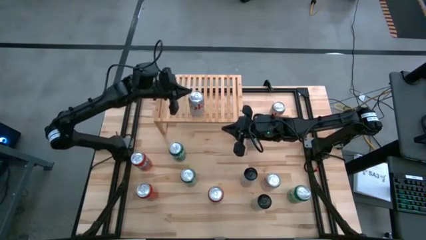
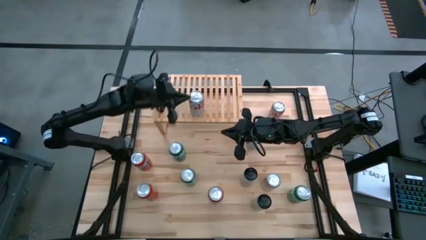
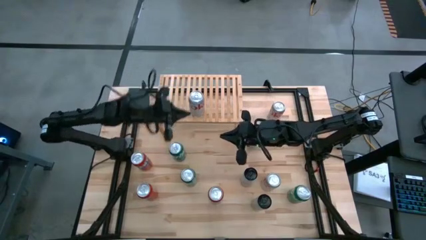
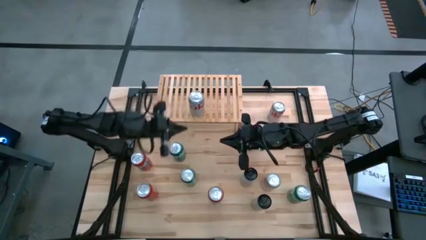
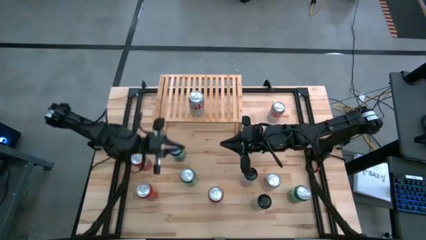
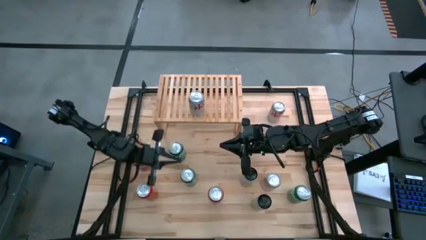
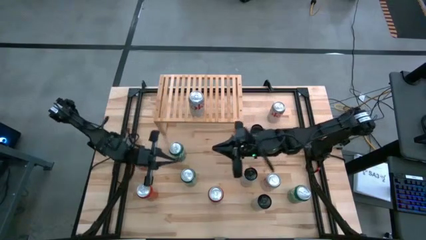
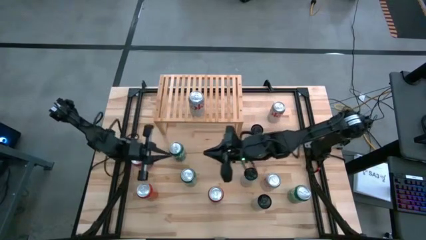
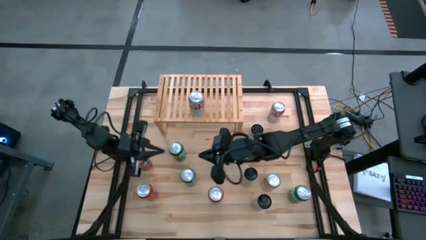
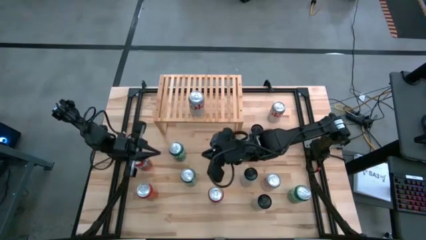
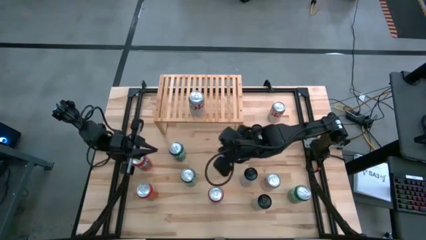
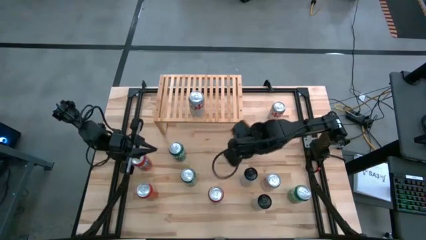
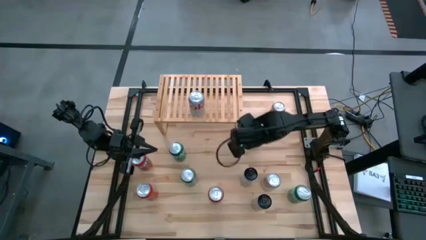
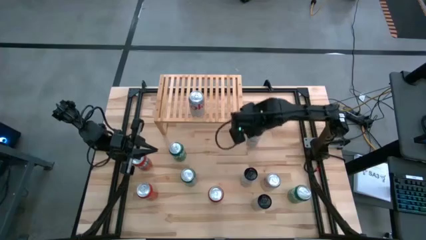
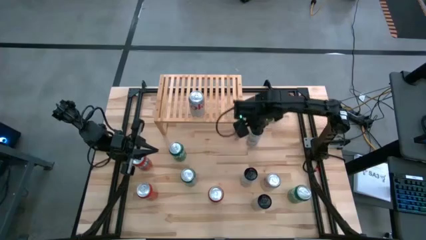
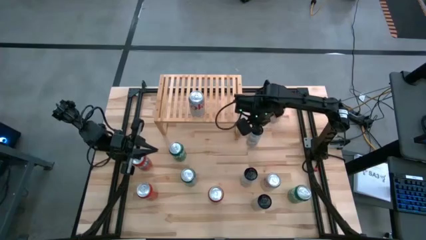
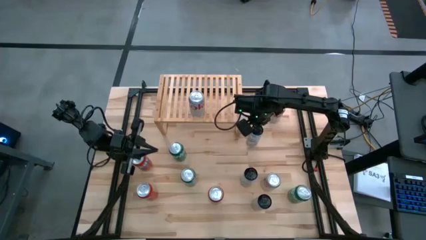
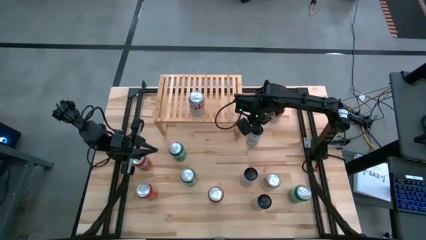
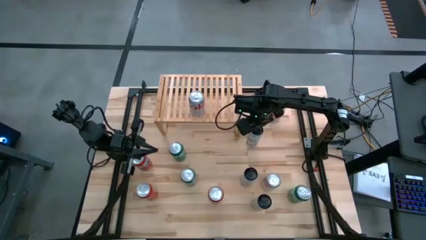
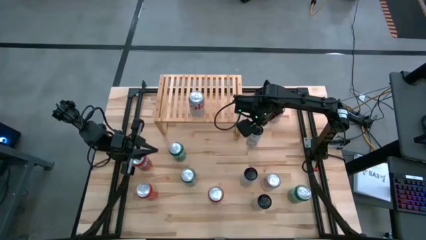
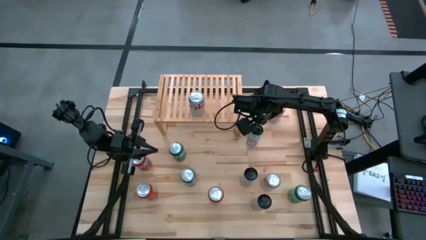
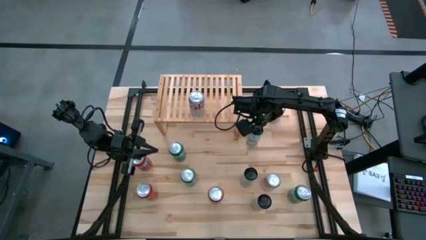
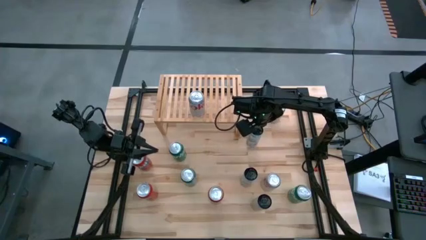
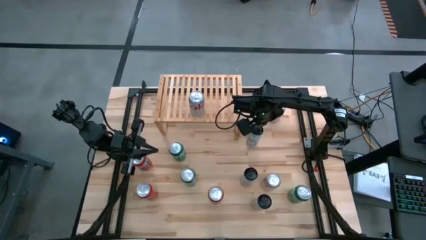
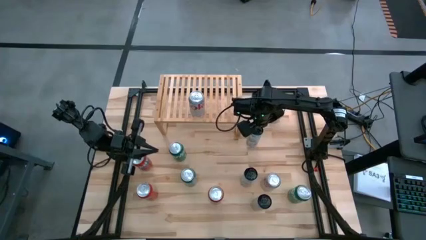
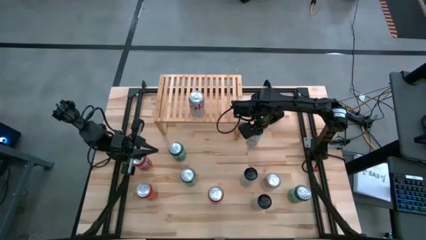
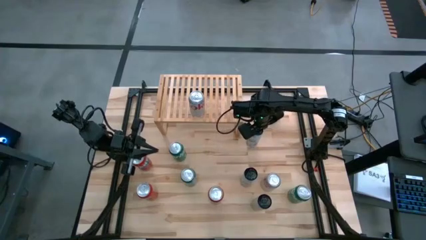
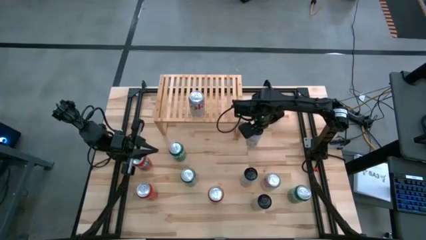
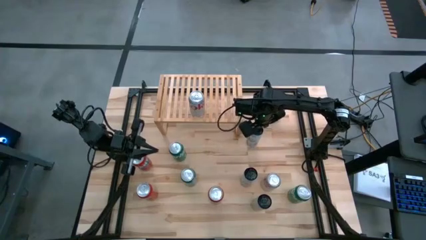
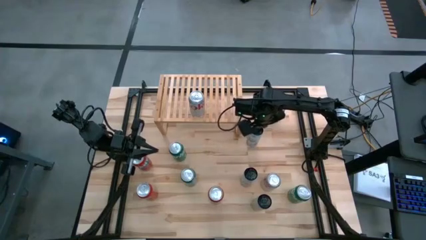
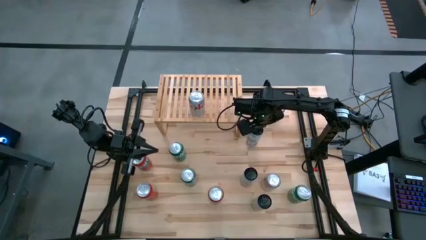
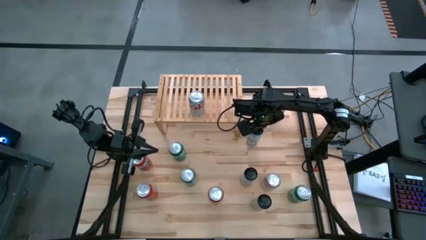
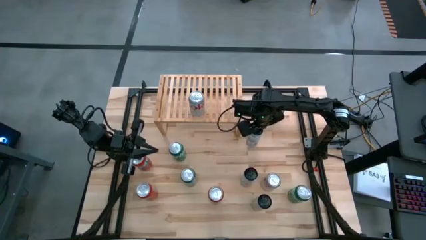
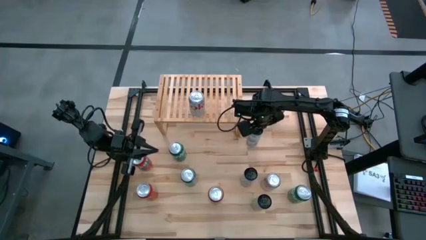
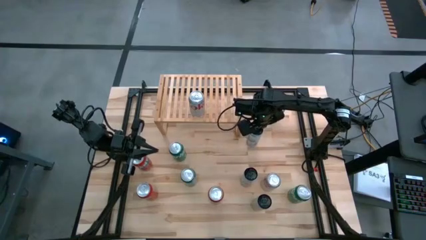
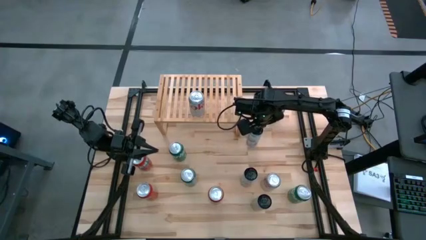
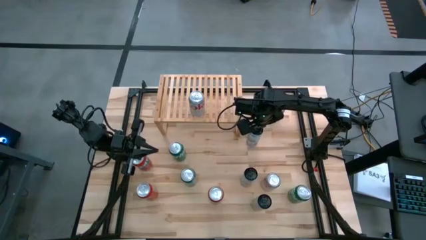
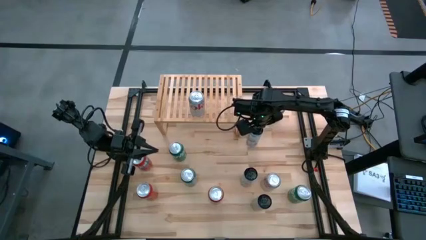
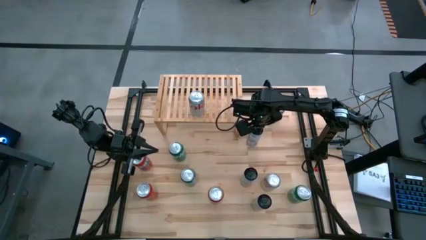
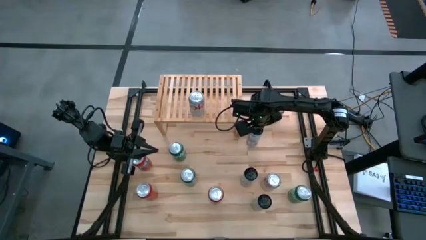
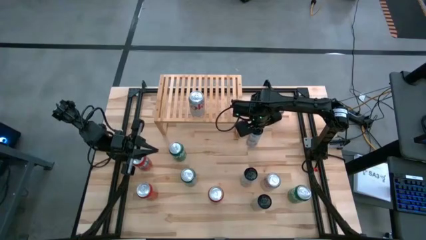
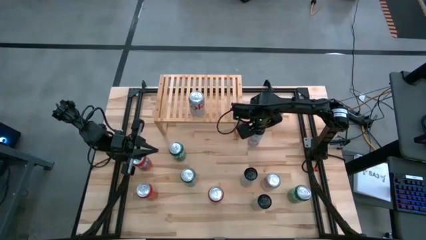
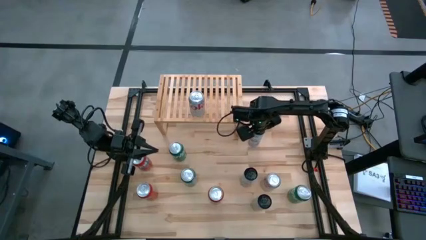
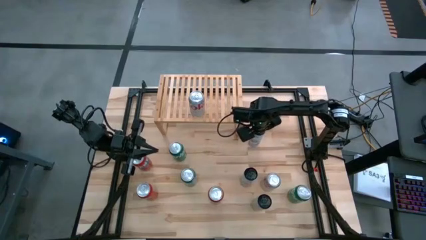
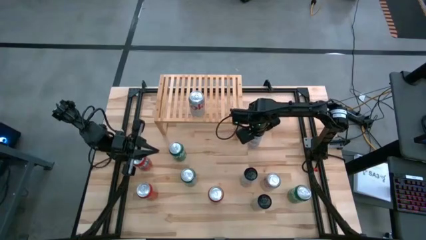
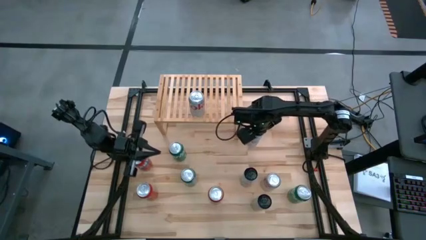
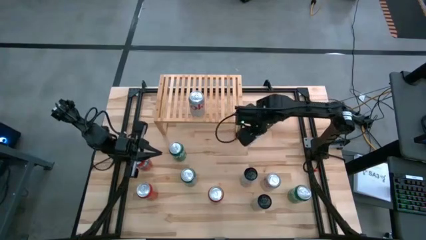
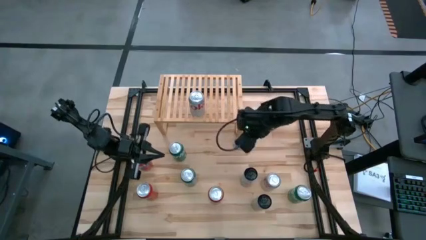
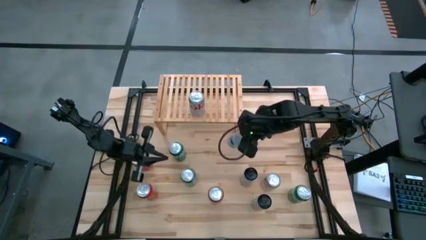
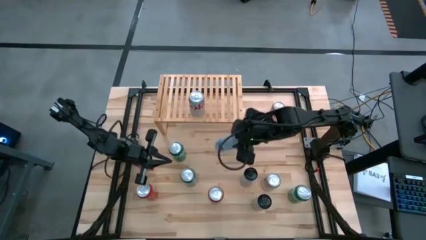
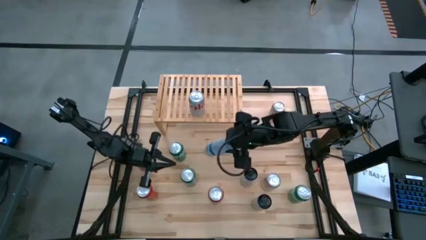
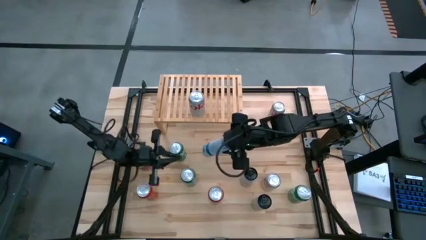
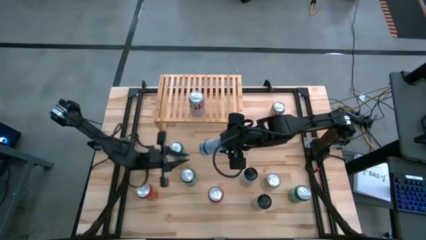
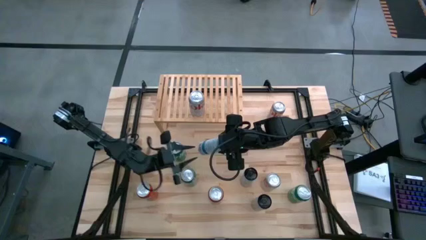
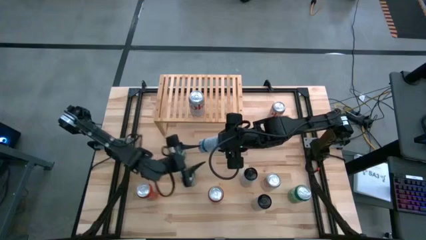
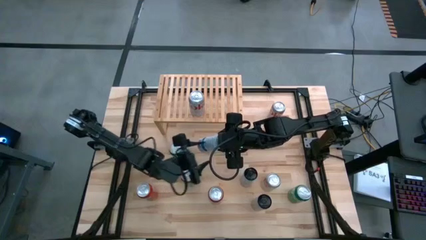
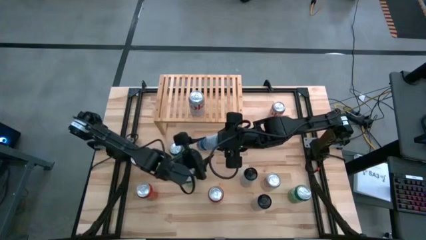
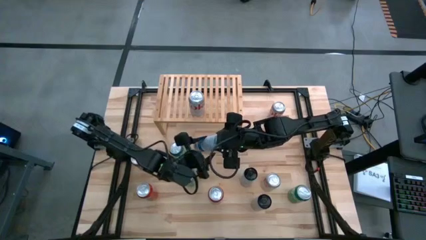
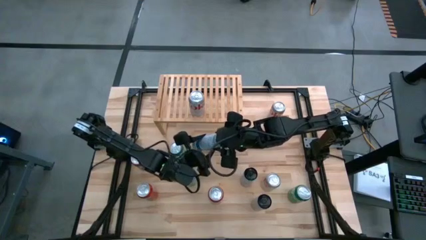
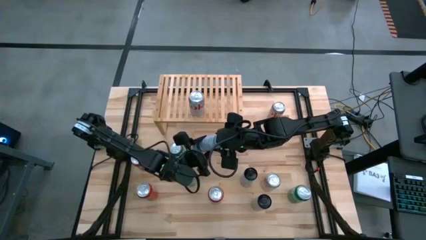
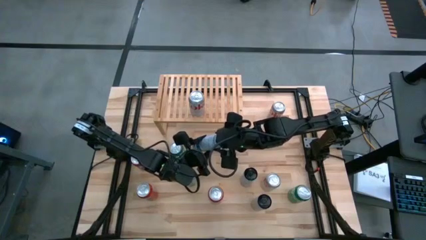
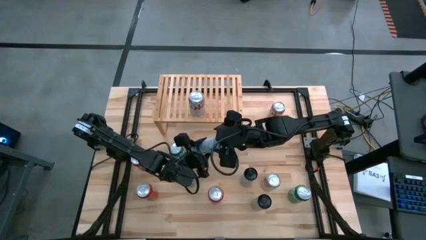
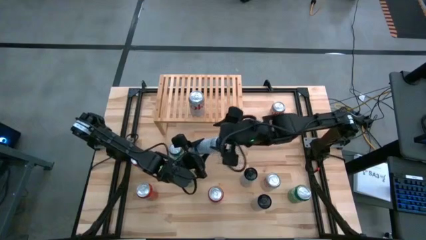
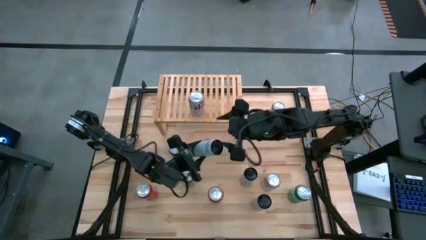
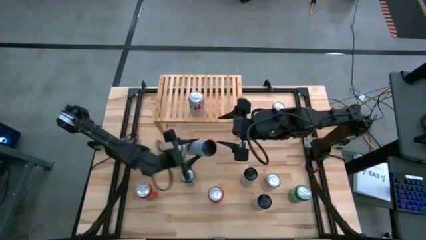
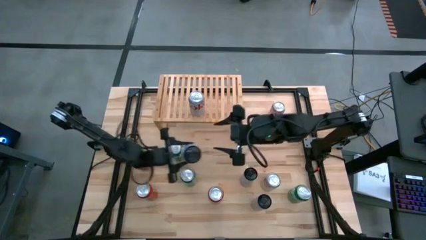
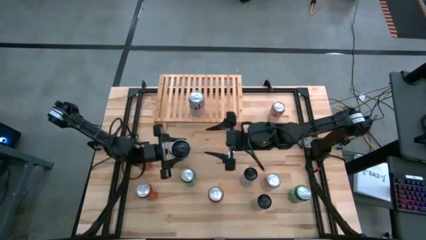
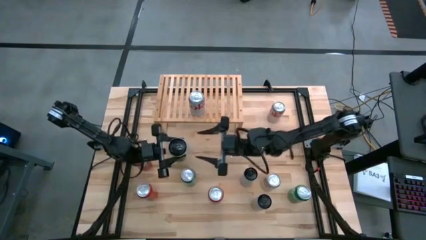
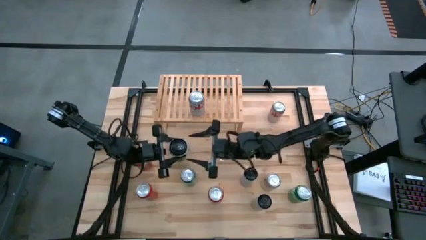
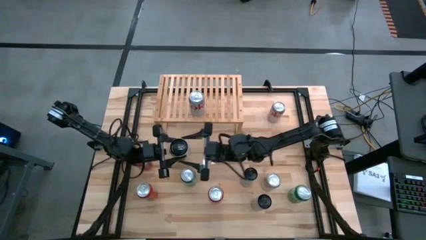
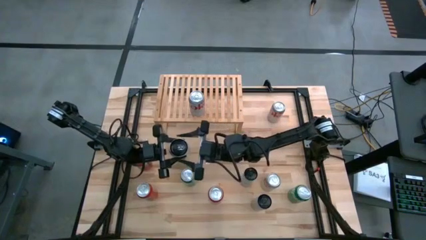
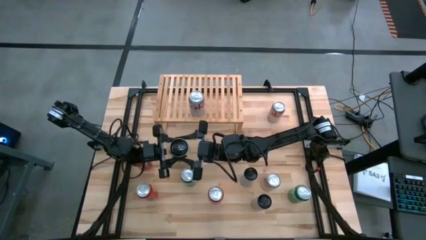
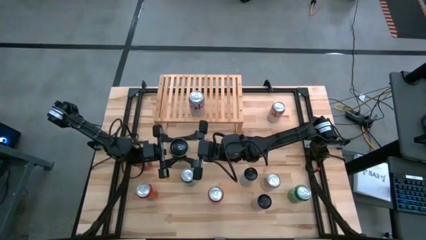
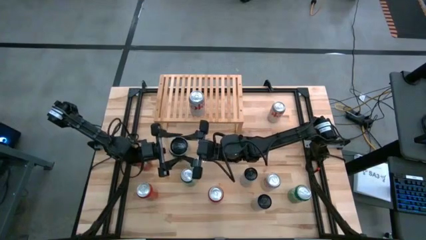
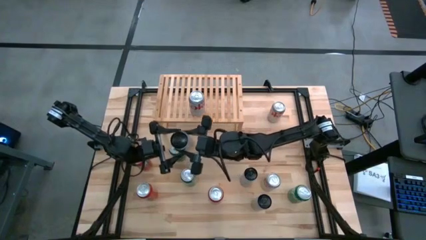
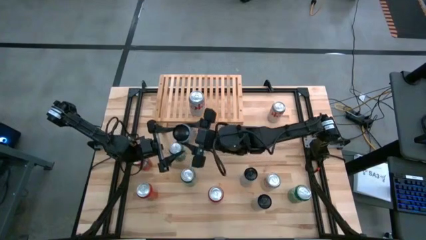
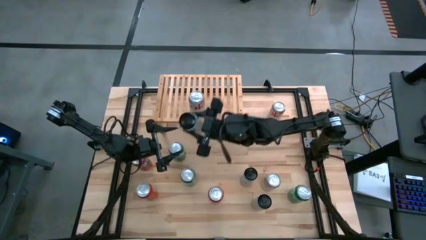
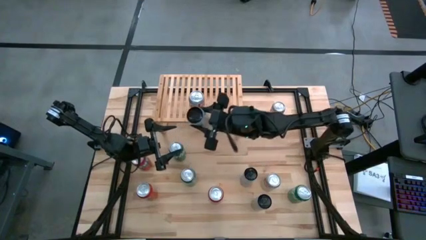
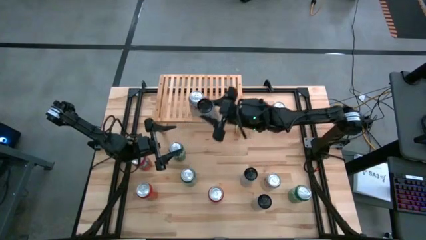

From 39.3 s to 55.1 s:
Task: Place canned beverage on shelf
Put the top blue soda can on the shelf
